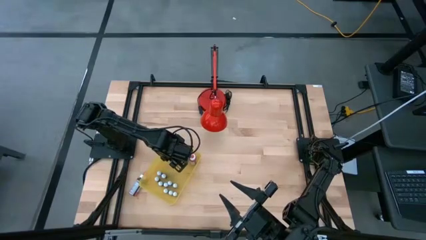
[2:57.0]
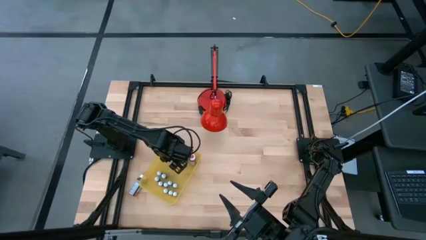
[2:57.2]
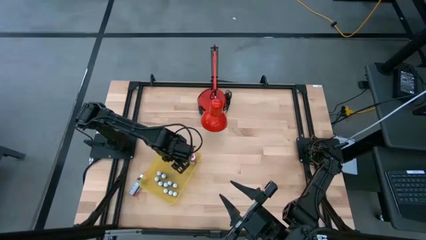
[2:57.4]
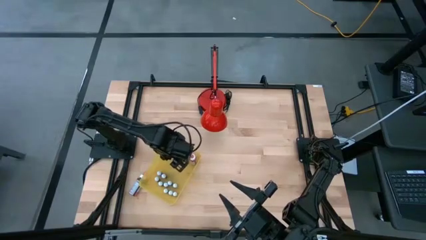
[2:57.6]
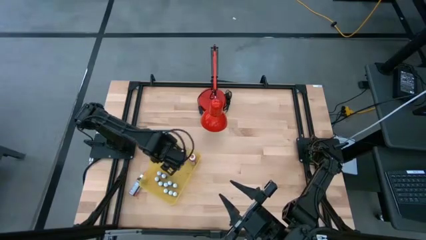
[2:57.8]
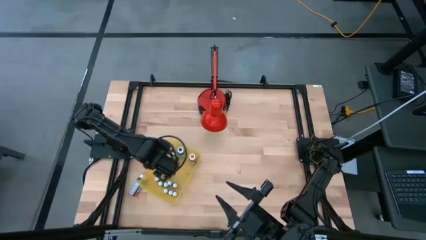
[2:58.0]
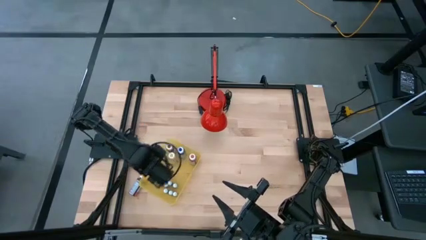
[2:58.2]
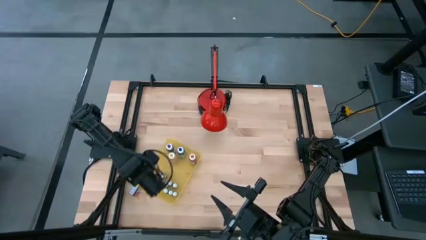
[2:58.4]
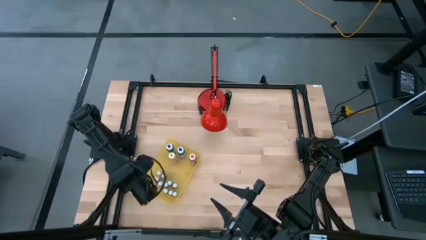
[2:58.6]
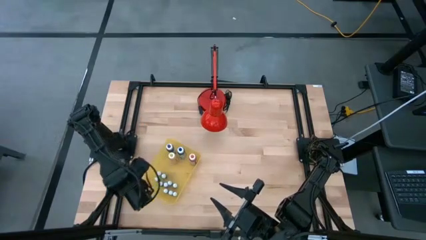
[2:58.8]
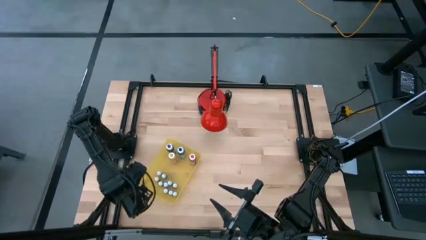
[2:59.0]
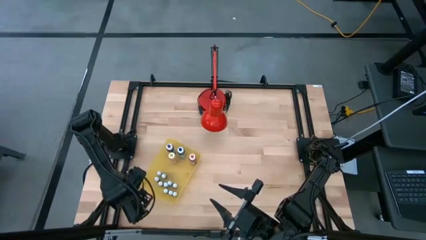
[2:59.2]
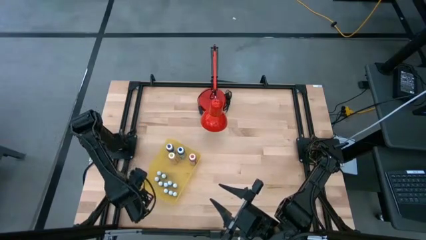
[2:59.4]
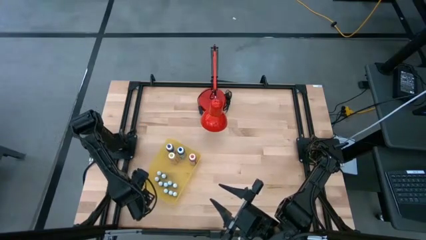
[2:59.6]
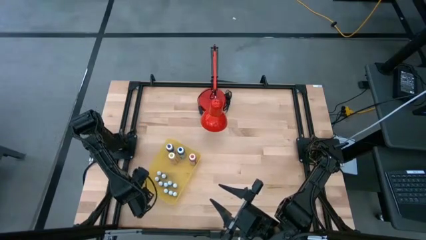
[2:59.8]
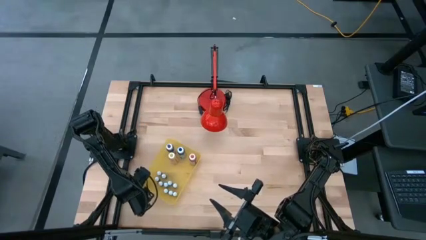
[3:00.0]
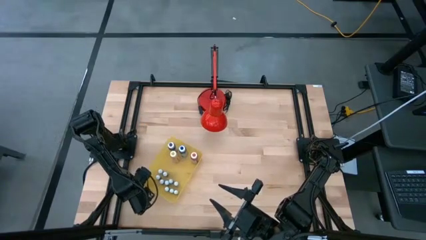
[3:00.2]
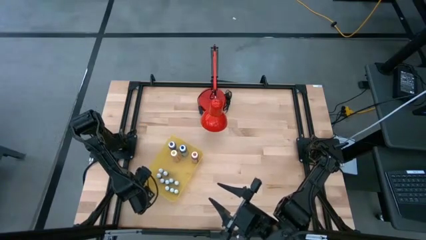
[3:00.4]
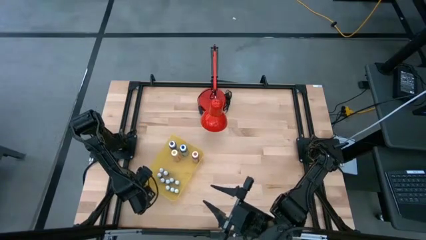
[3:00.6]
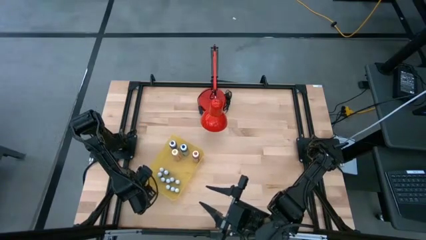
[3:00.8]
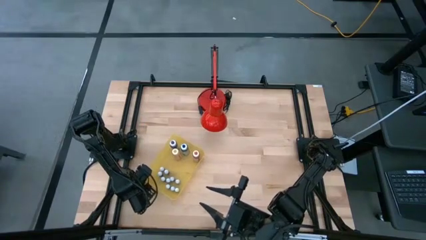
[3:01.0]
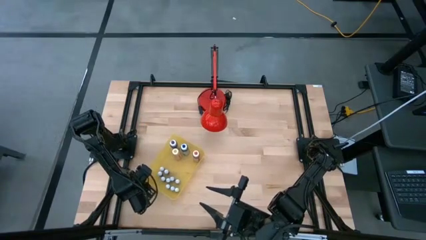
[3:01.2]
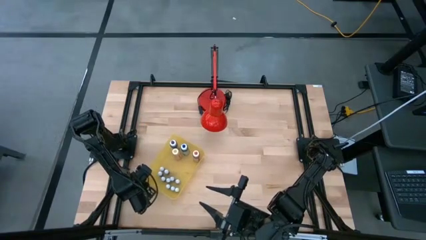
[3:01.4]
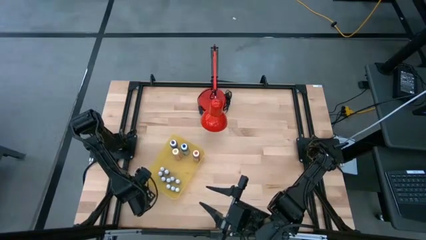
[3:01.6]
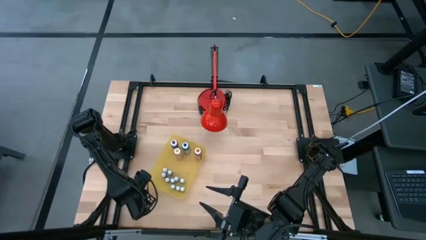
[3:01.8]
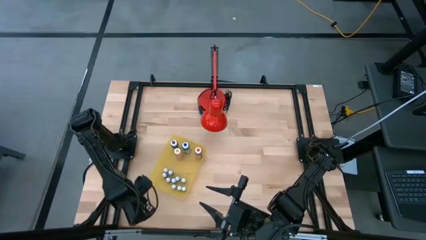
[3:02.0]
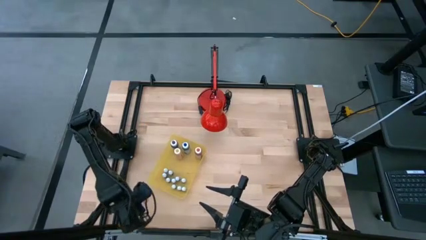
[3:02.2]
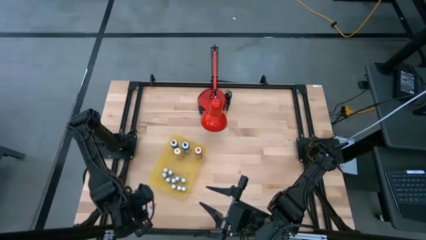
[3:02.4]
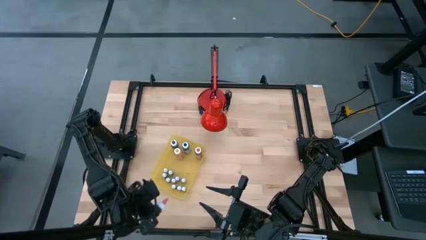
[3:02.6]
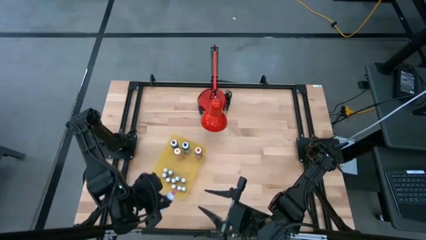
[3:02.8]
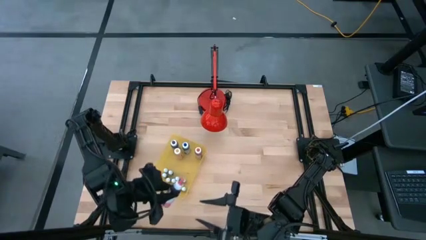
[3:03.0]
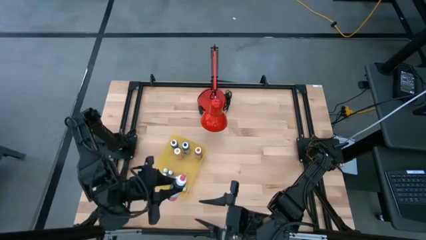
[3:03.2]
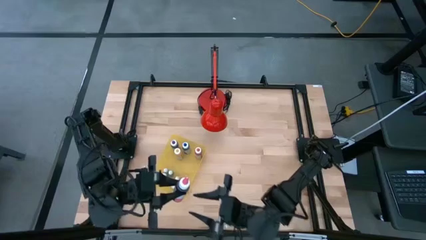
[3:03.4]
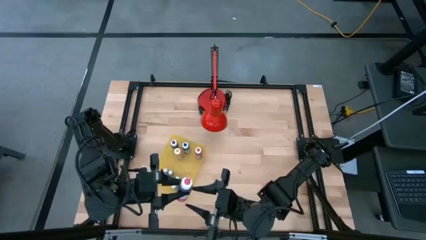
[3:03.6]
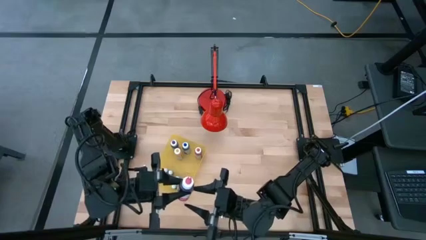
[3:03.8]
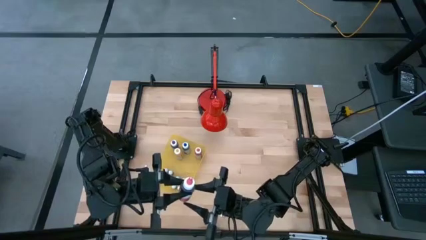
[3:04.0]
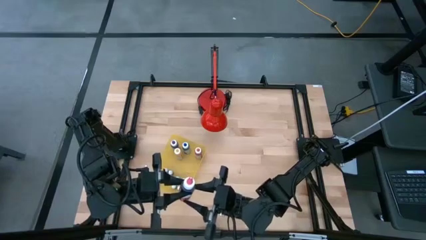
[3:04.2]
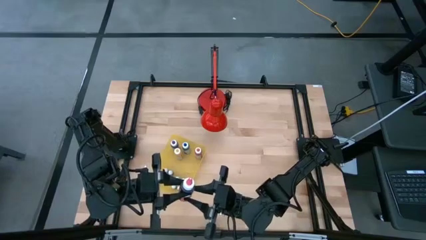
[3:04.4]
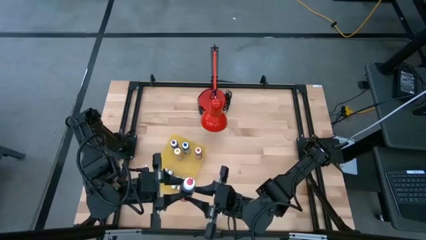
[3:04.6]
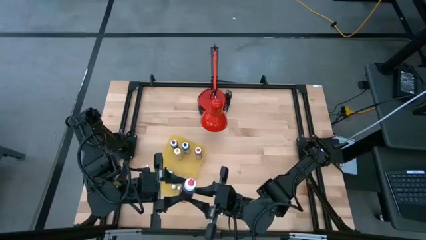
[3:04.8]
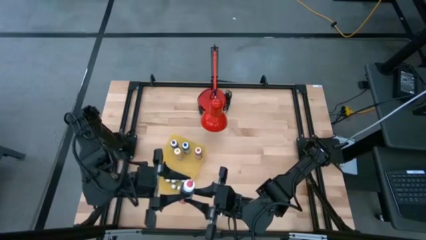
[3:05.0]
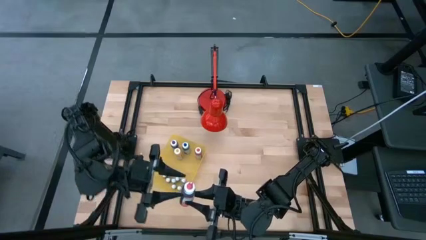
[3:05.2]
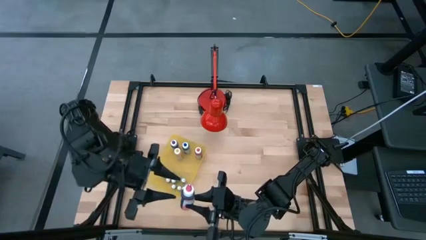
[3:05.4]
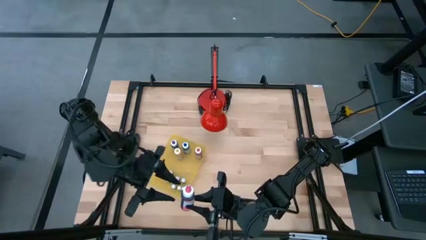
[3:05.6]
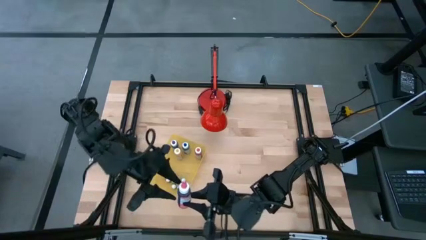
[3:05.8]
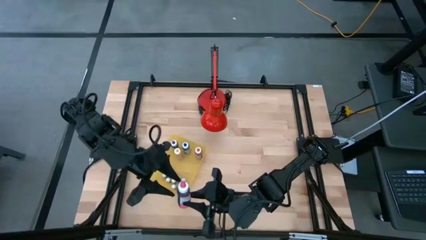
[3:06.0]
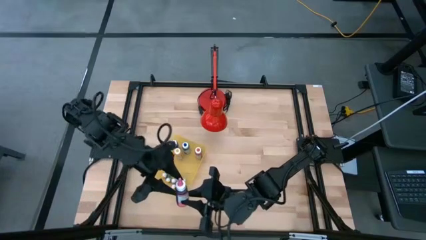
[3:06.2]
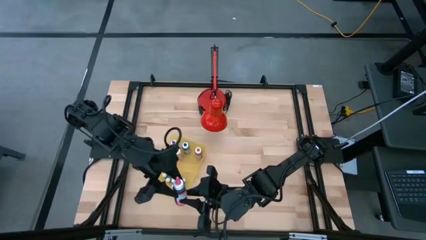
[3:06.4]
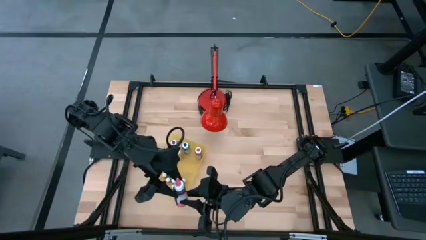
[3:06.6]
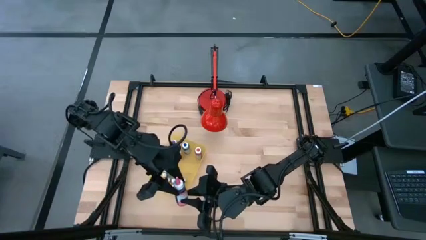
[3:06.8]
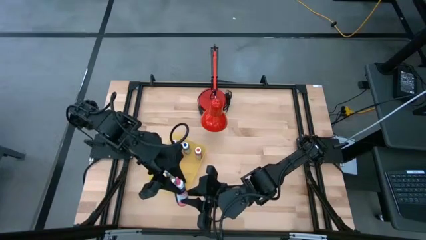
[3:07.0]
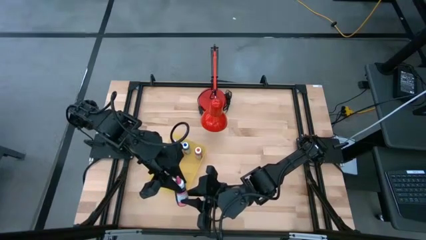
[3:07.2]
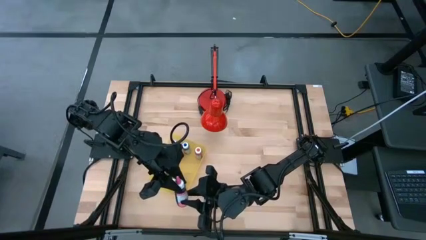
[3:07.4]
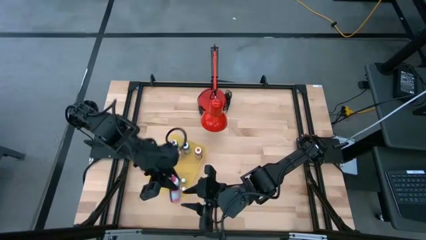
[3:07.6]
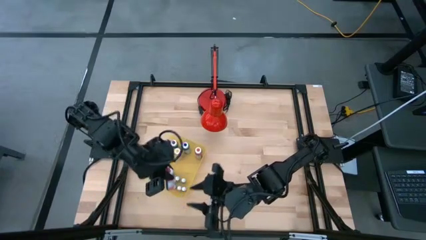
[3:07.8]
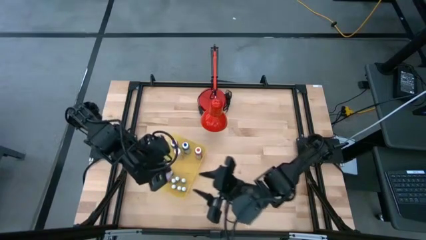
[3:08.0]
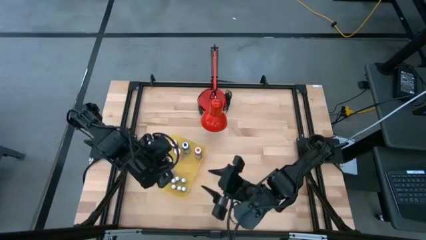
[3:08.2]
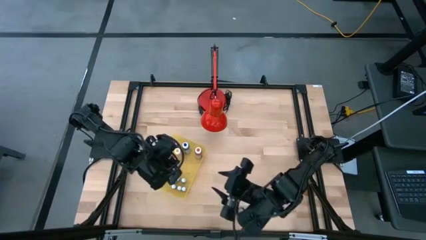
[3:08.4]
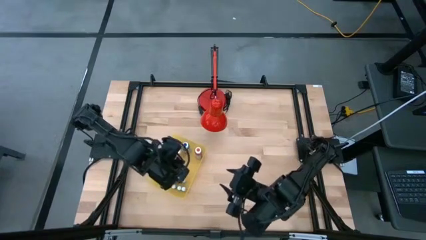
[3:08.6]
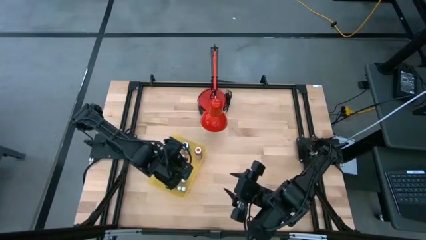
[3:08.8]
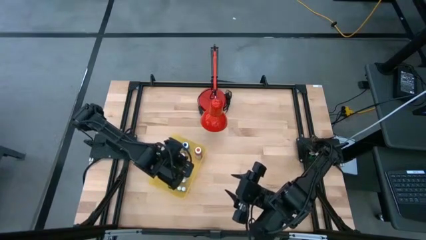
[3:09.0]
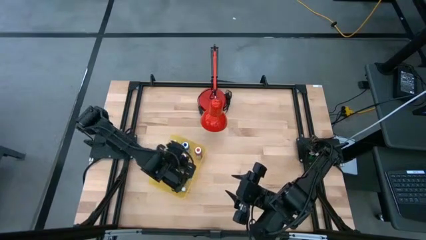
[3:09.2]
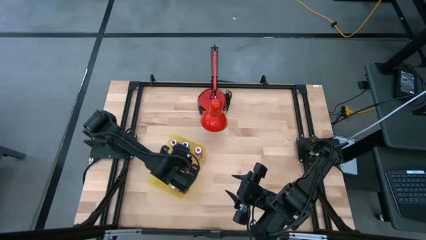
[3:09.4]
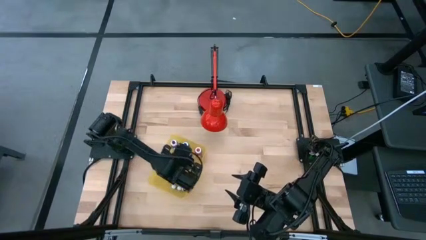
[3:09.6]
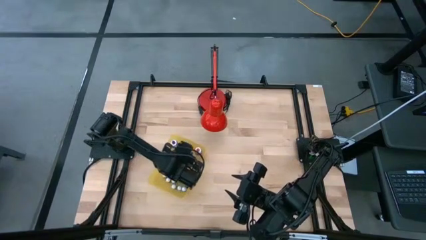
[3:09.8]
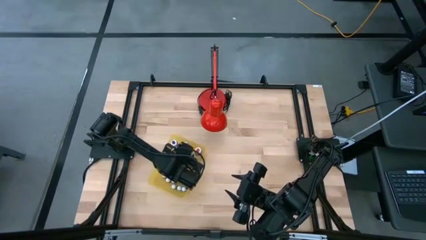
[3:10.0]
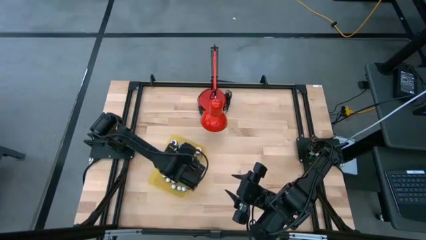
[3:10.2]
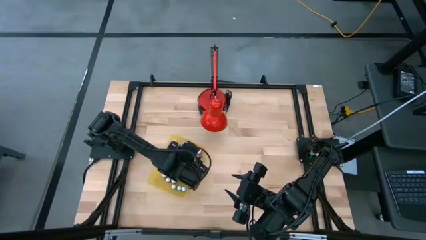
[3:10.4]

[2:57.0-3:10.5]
Task: Pick & Place food coloring
Put the large pink food coloring bottle into the yellow bin
